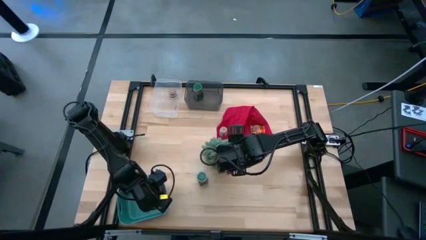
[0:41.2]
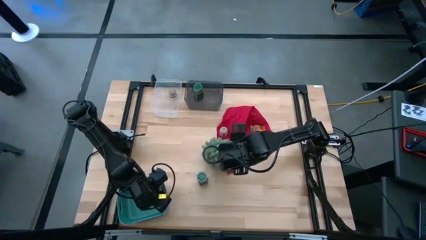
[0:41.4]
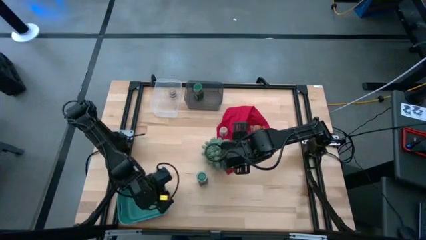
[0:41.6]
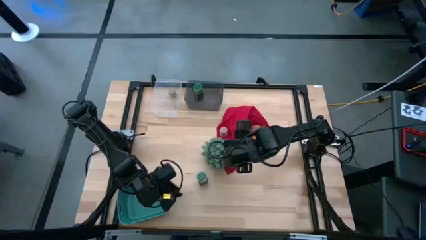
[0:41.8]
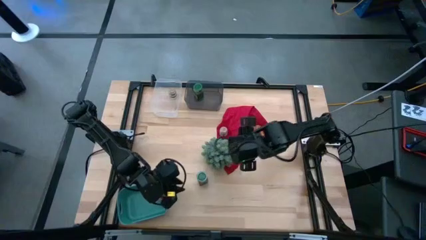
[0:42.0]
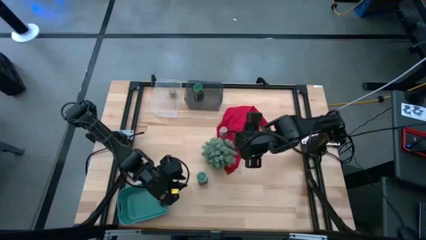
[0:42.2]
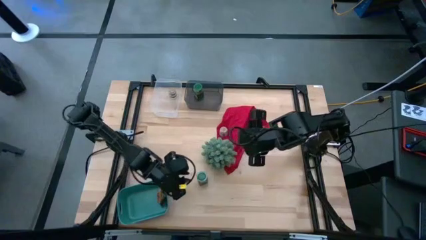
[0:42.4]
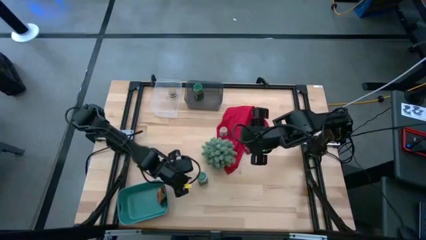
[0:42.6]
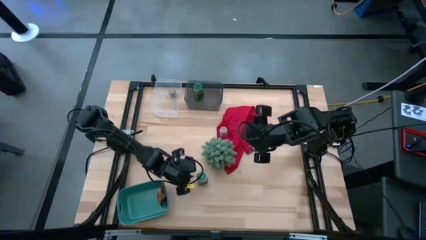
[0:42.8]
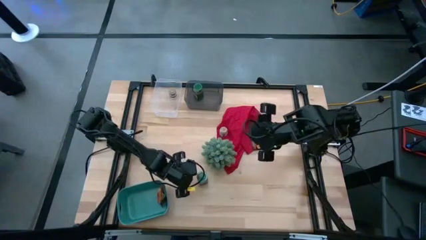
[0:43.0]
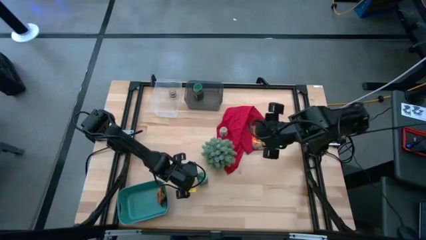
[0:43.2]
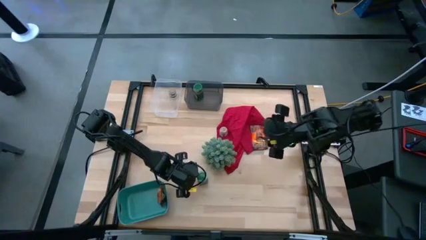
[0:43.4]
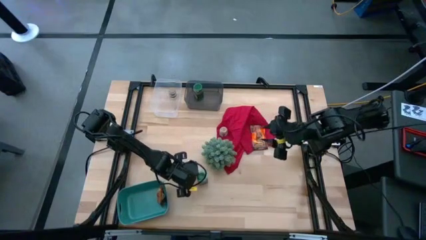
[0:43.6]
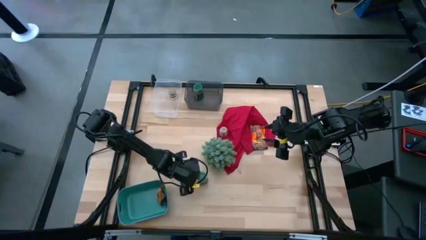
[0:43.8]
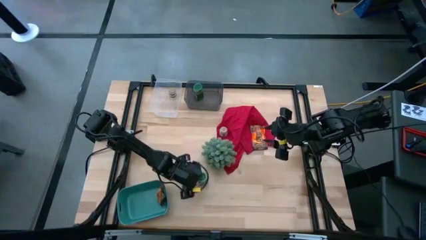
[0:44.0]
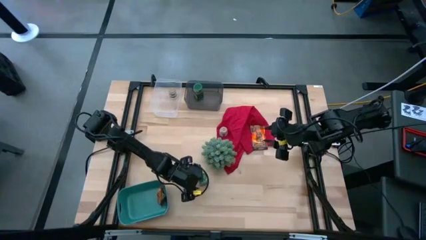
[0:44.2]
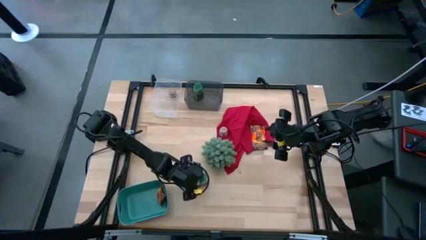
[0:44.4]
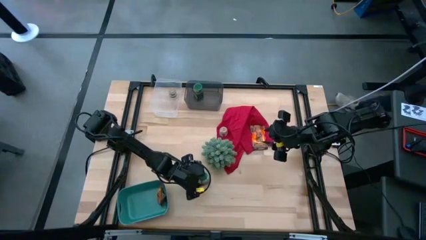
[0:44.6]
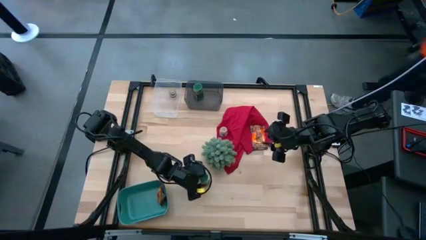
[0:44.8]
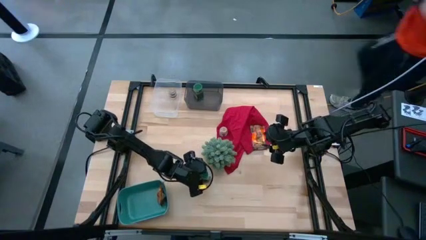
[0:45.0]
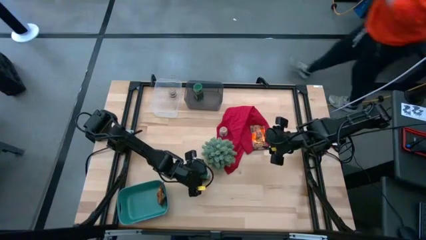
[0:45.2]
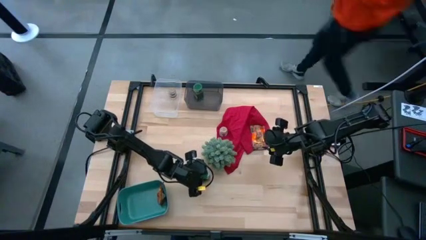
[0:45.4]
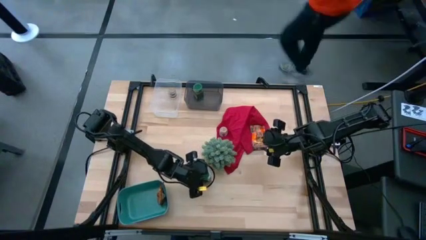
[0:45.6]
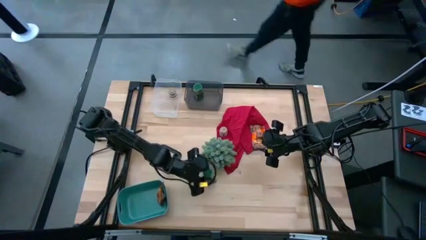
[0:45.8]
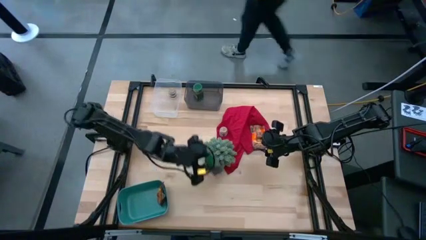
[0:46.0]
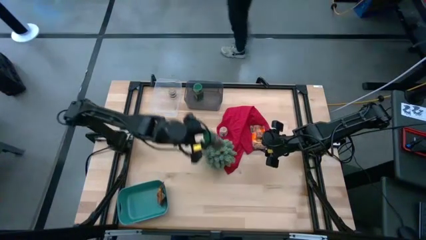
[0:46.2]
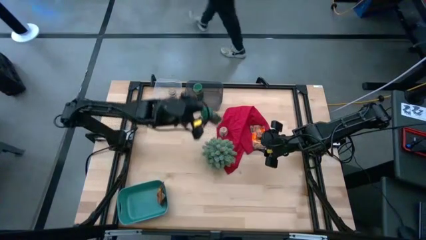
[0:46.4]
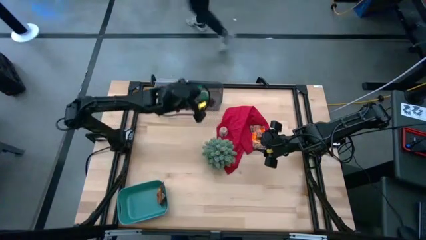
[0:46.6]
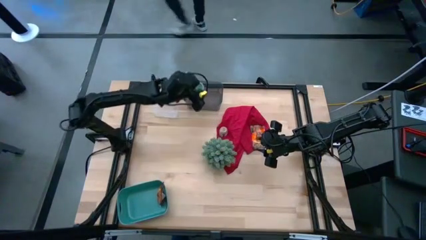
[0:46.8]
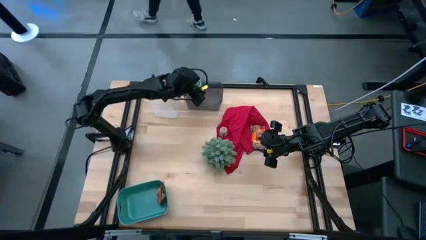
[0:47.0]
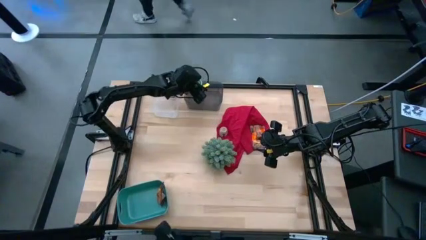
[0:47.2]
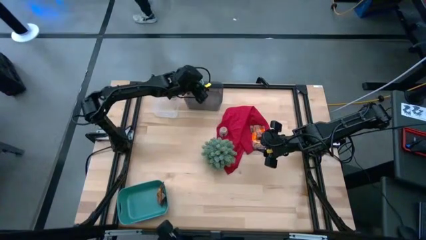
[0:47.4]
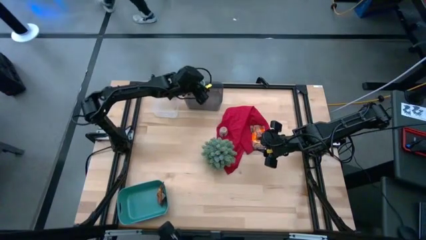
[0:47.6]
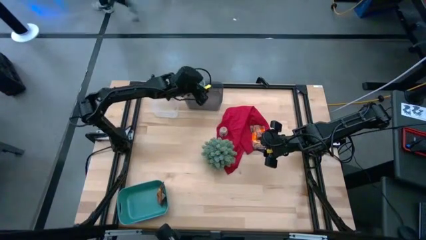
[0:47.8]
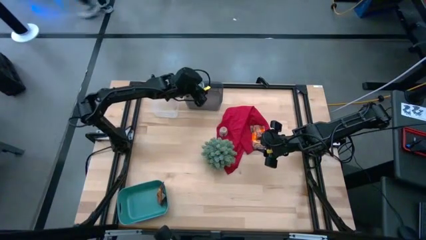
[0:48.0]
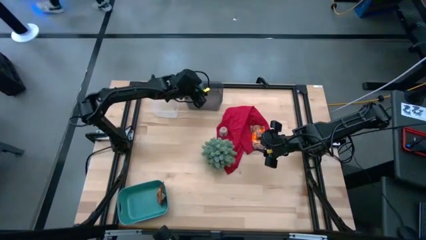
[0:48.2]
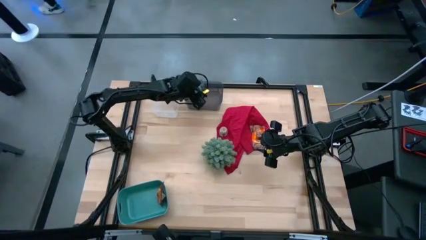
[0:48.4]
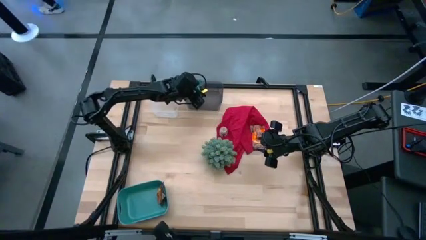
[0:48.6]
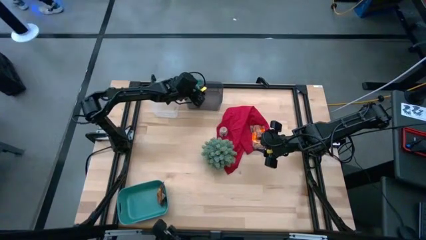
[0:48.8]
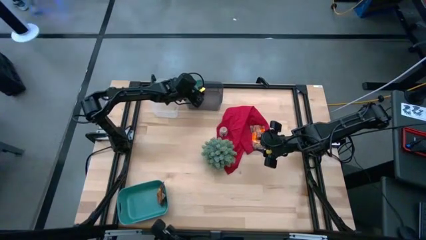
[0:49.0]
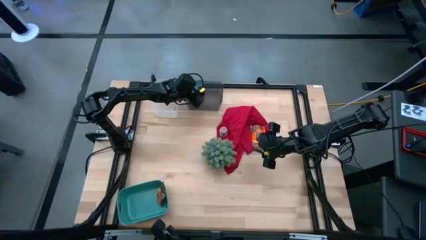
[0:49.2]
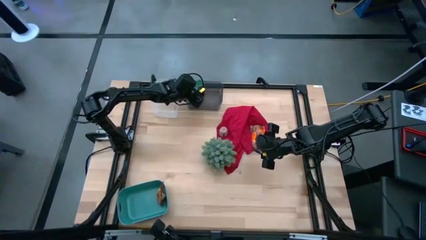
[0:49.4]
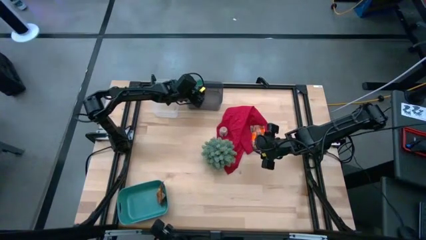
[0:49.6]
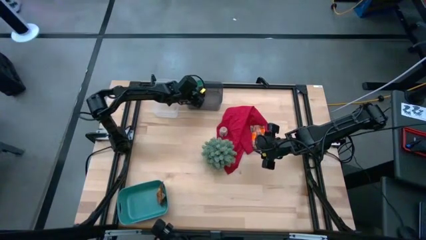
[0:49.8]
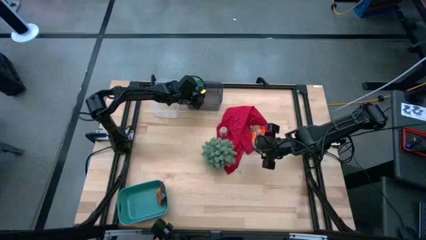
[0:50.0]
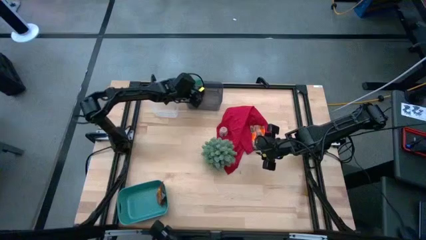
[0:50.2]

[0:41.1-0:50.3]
Task: Sort spices by type
Put the green spice bottle into the black bin

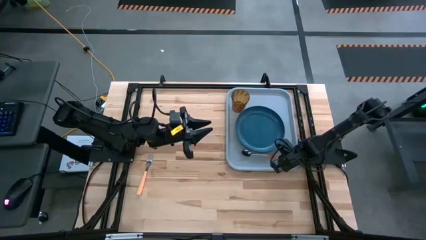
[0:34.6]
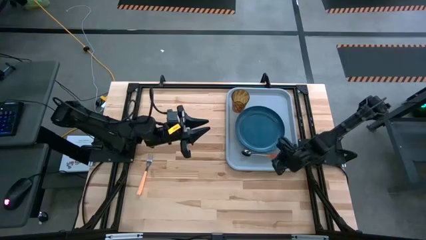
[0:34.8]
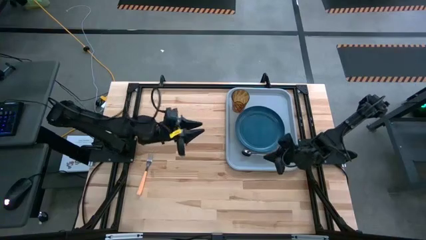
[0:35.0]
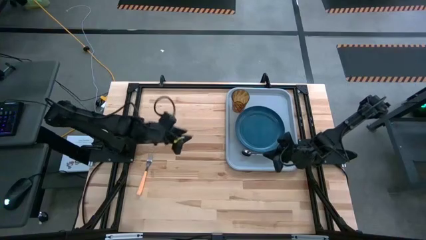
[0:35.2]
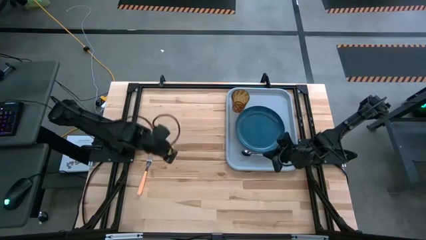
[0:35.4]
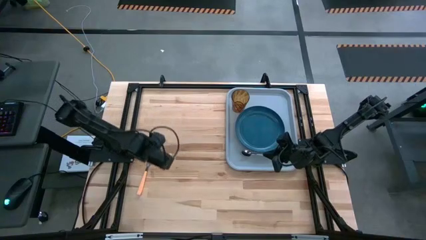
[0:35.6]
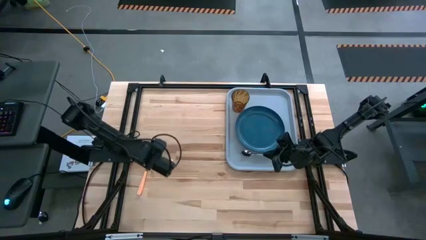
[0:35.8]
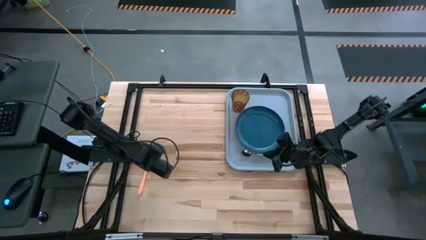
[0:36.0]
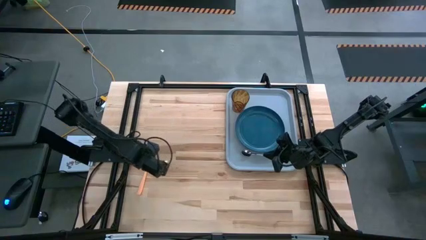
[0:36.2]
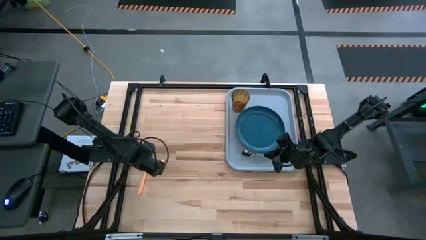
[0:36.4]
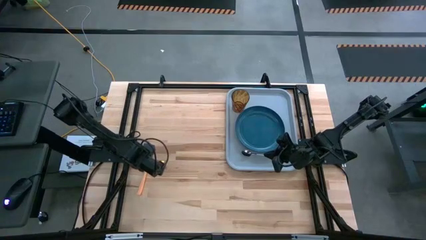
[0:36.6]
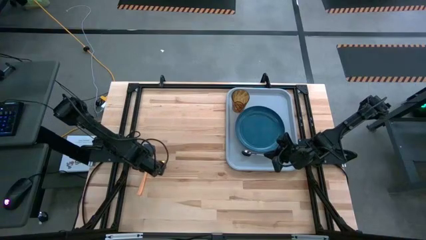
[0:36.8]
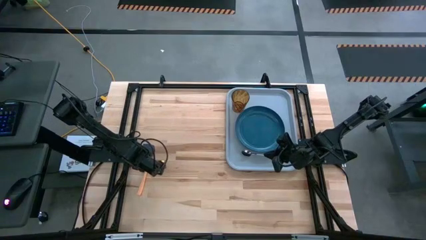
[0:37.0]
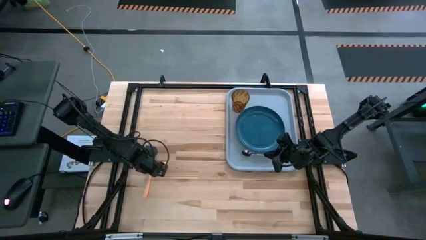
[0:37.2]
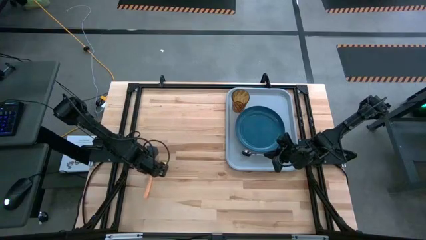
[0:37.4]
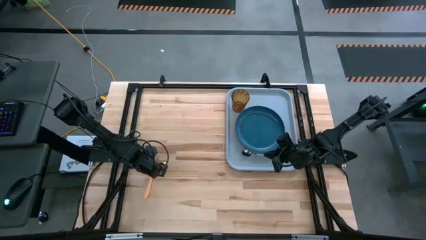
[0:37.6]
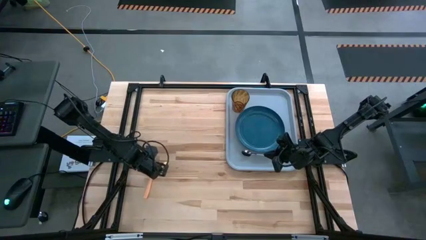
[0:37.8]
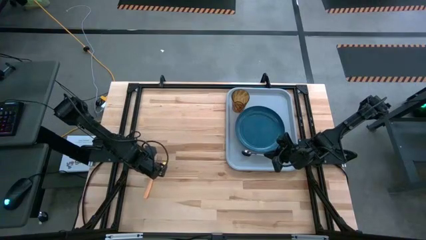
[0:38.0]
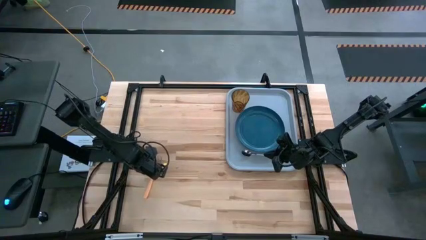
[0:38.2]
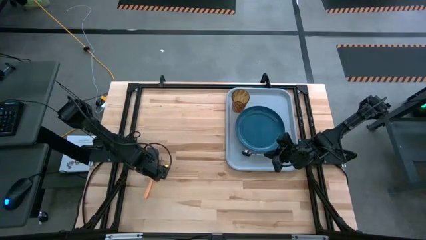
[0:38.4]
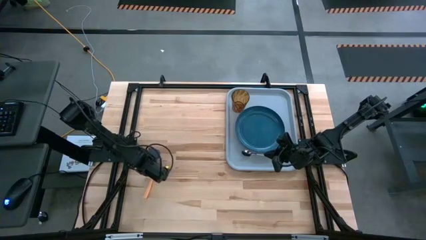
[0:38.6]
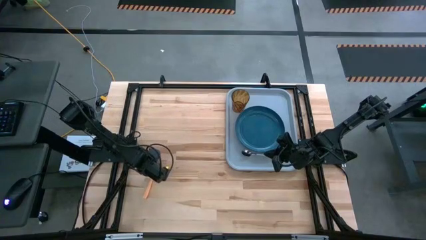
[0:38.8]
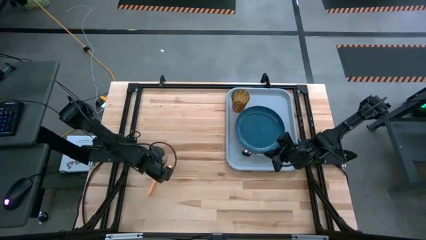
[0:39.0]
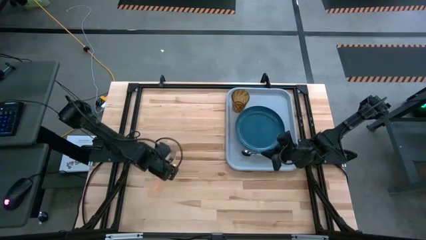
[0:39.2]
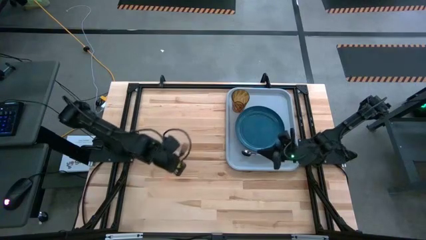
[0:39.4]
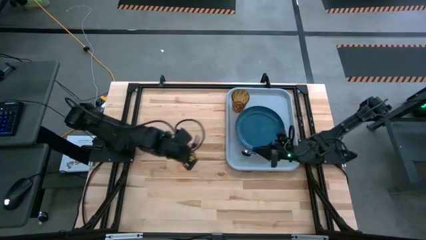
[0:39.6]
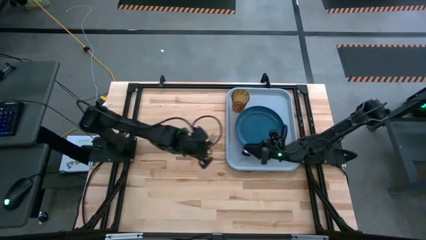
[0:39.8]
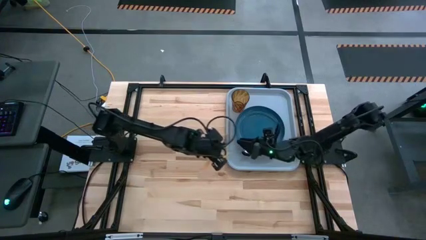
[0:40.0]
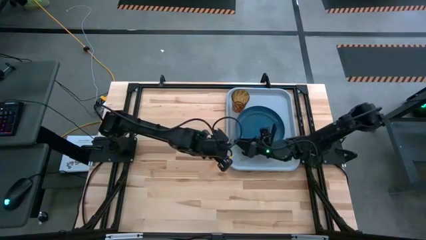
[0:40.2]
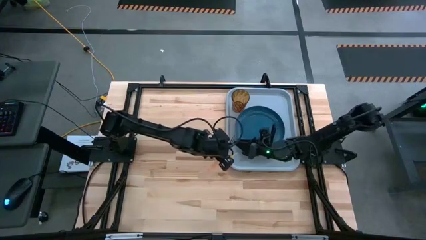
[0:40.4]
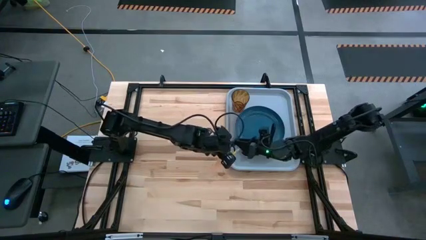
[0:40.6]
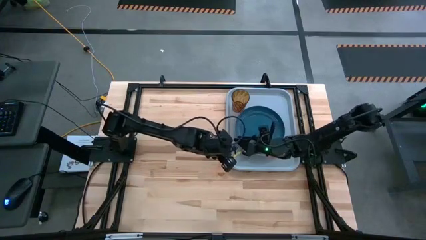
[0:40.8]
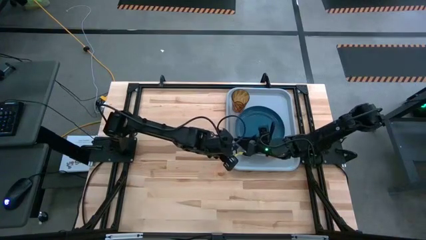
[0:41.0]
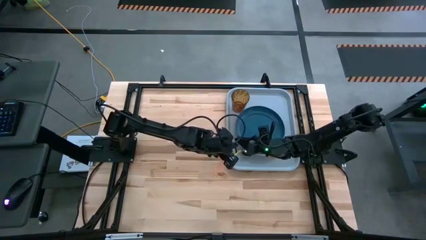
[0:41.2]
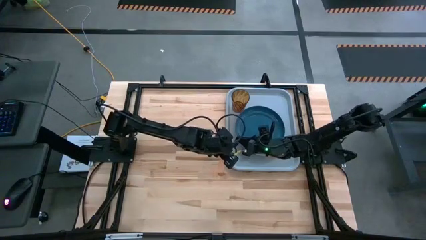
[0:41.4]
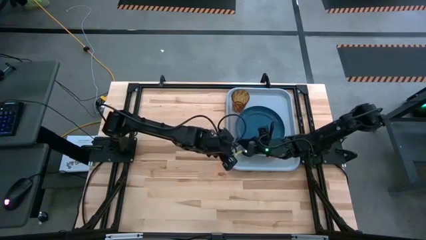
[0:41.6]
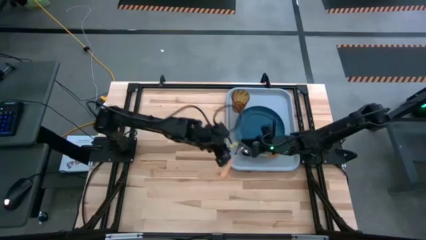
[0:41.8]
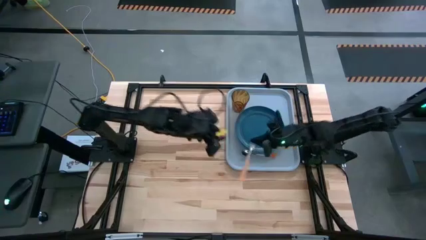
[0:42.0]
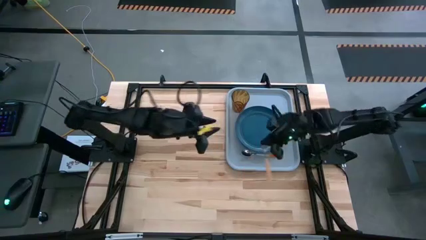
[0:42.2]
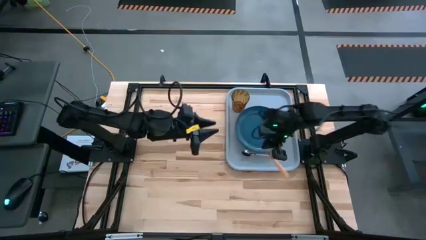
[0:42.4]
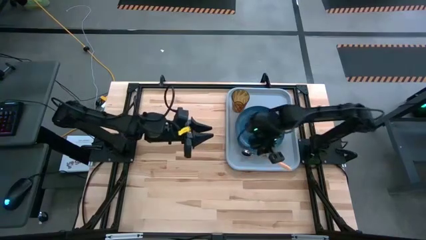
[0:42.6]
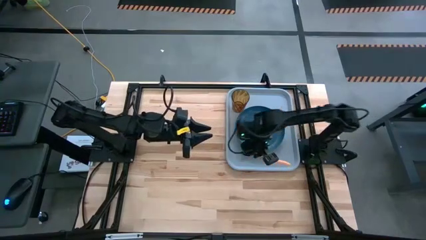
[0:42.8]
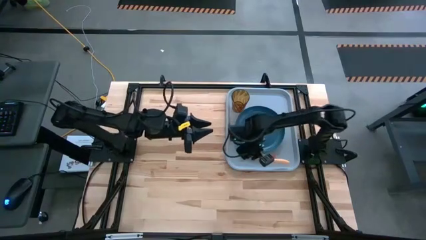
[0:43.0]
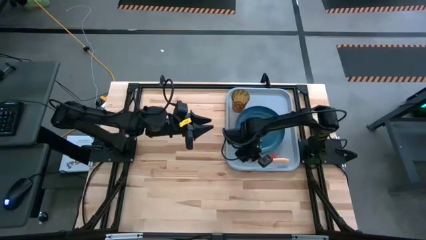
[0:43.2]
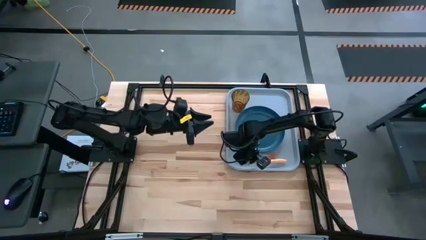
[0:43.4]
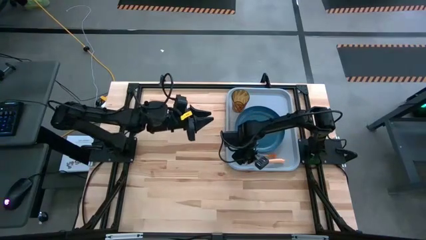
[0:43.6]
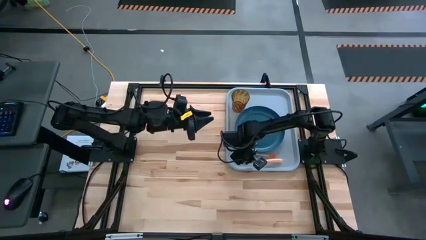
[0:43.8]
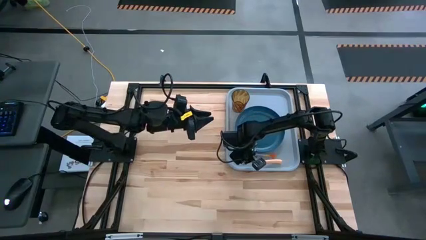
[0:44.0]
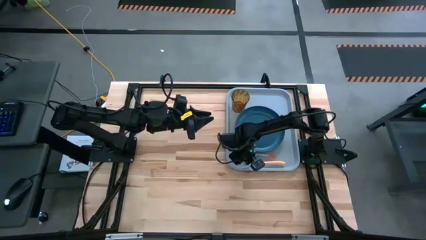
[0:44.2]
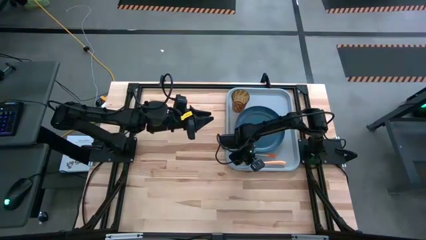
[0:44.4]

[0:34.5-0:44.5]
Task: Pick and place plate/cup/fork/spoon on tray
Put the light orange fork on the gray tray to the bottom of the orange spoon
